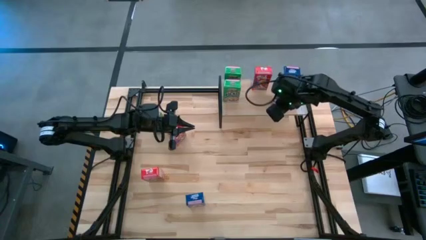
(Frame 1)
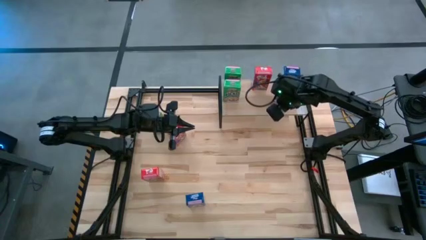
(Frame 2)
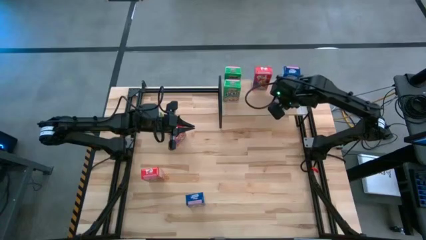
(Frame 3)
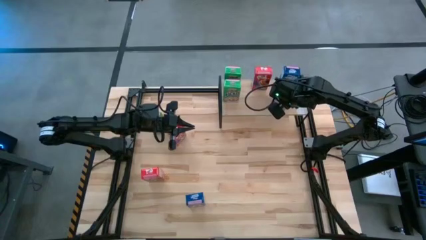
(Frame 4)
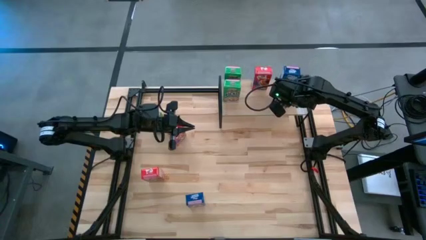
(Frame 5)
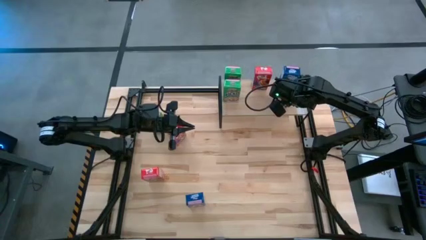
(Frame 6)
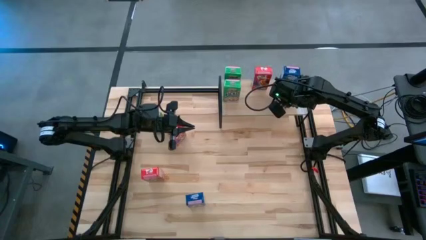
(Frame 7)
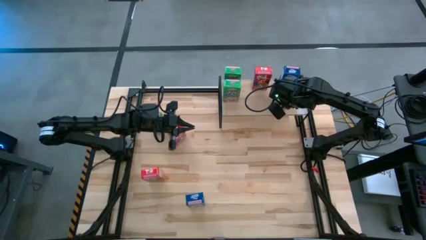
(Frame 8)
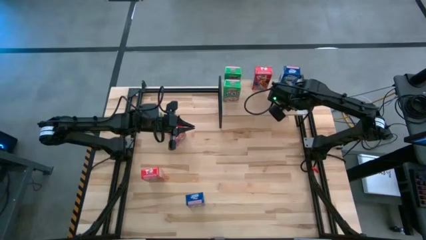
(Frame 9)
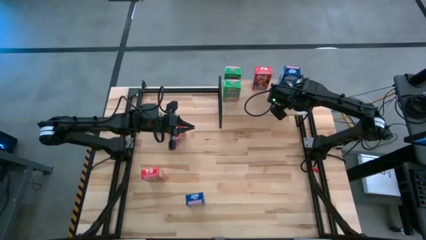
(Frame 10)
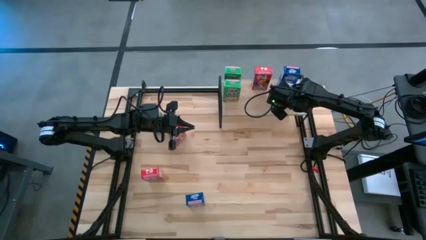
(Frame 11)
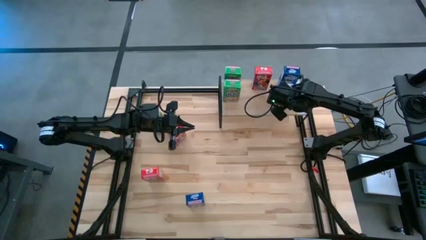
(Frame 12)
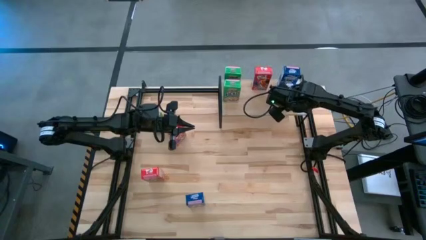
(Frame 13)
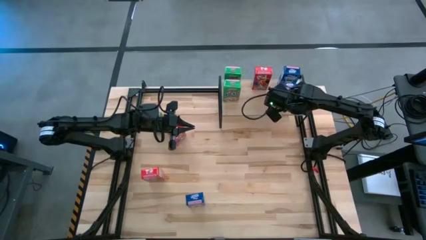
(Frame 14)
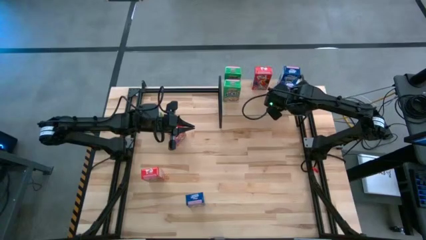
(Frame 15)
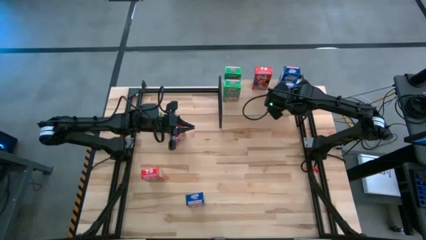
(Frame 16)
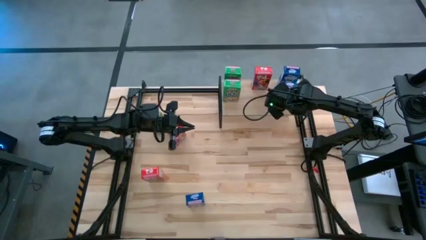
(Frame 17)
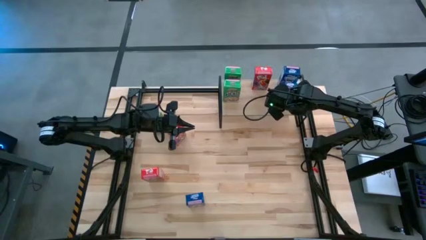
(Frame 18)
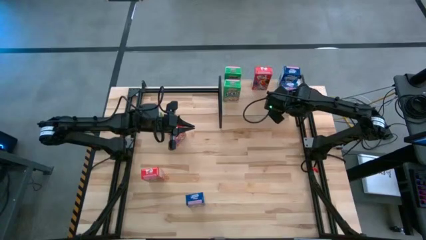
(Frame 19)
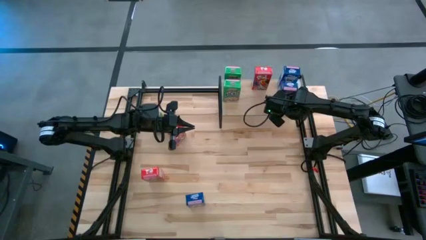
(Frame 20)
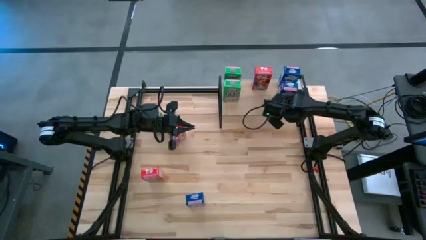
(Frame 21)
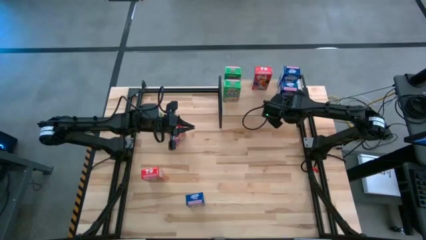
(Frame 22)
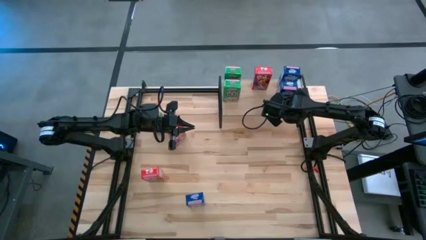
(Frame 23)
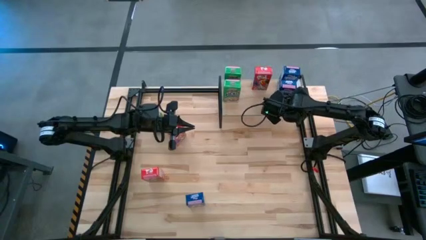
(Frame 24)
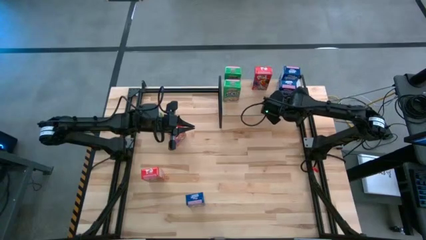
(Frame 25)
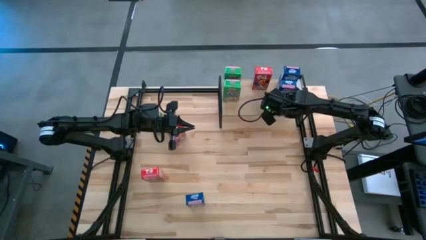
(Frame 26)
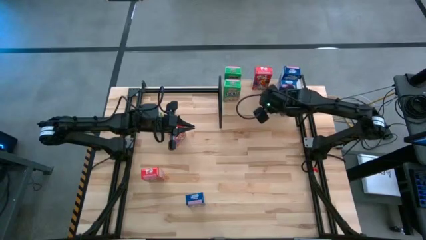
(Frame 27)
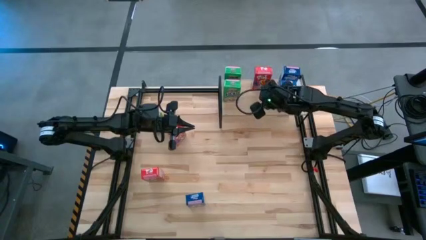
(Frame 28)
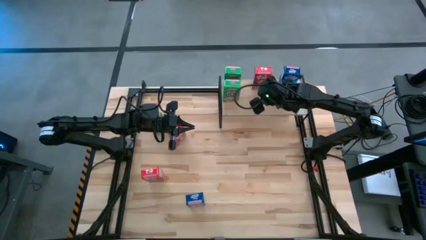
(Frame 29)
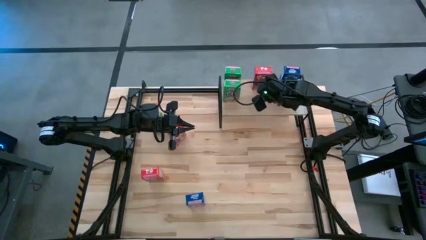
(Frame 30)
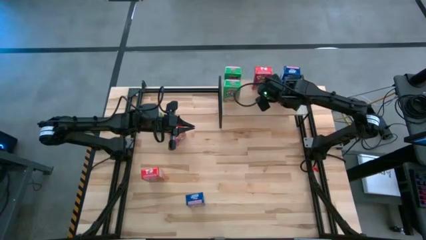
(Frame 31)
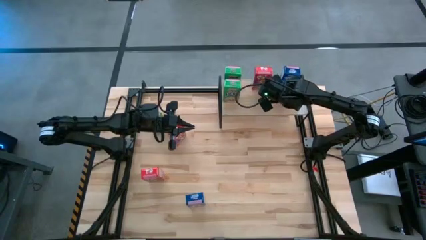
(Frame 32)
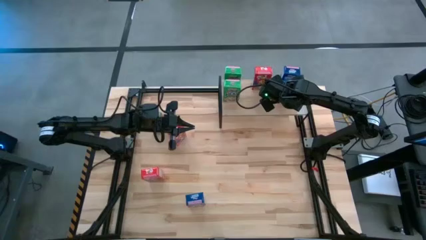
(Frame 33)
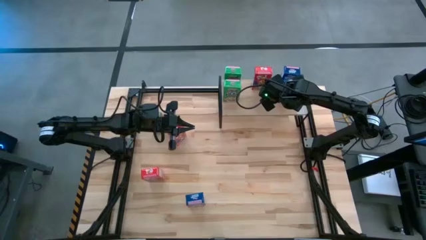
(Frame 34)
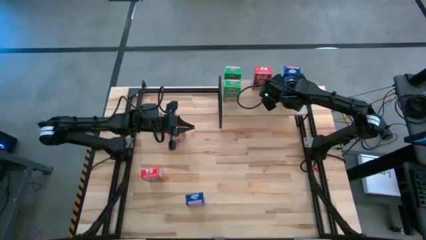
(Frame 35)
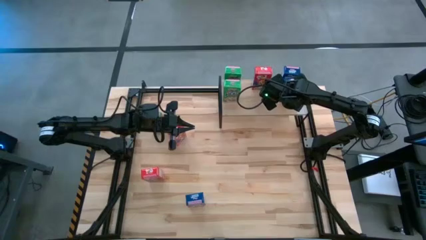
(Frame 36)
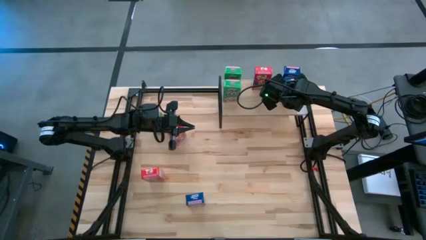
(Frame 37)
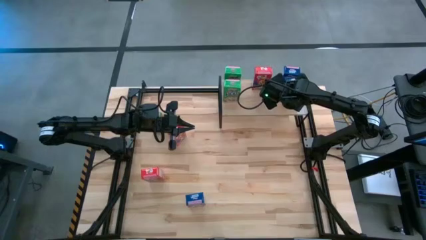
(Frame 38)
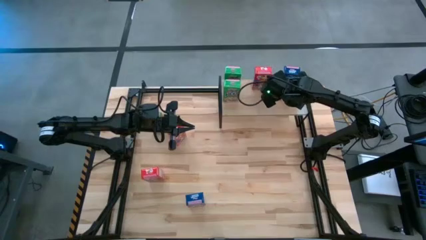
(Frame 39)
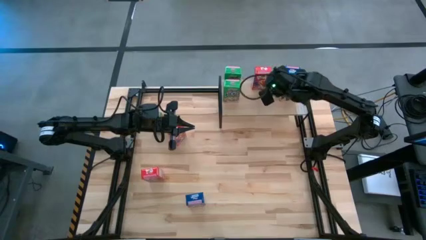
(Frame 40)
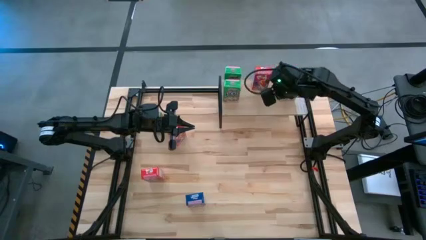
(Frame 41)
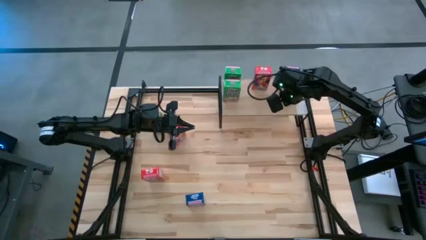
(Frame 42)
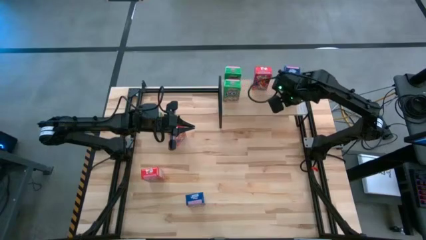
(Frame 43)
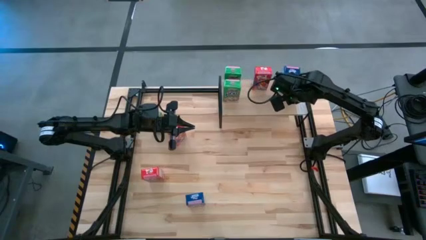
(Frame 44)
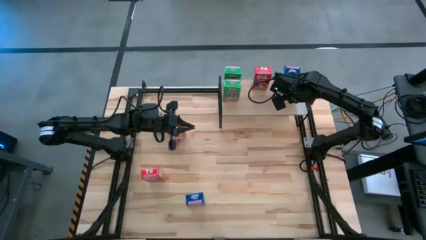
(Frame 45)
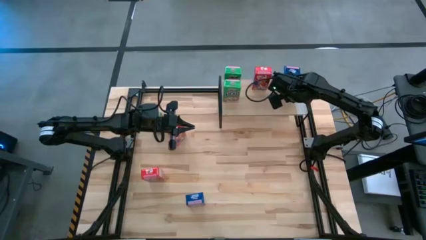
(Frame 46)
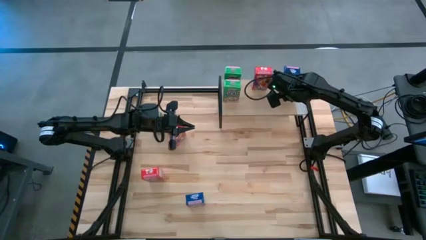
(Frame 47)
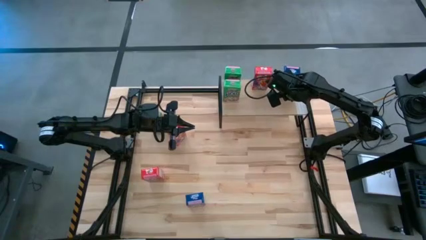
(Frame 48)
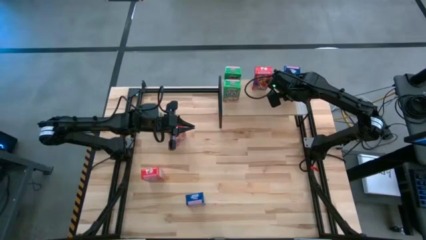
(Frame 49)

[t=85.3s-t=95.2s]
Task: Stack cereal on shelf
Put the right blue cereal box on the shelf aligned with other blue cereal boxes

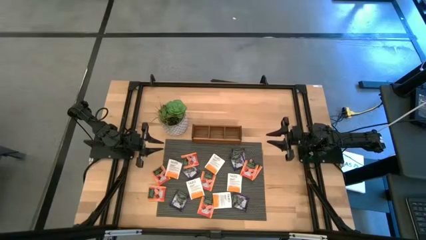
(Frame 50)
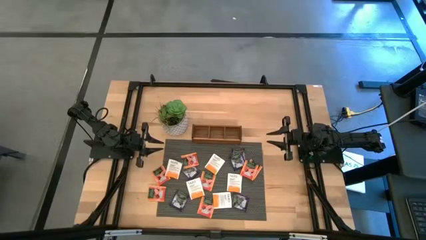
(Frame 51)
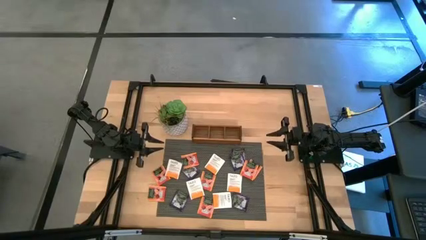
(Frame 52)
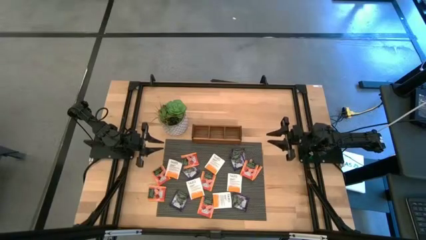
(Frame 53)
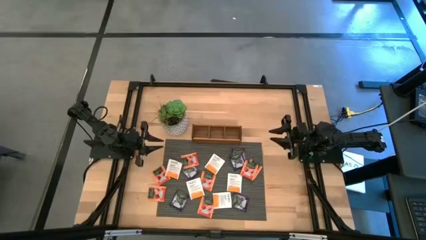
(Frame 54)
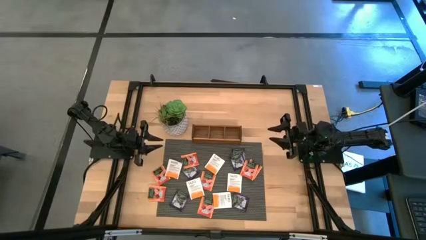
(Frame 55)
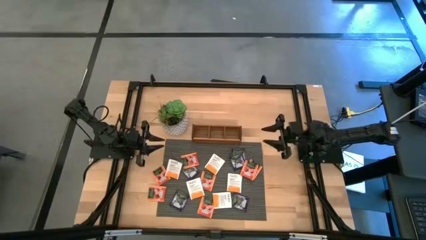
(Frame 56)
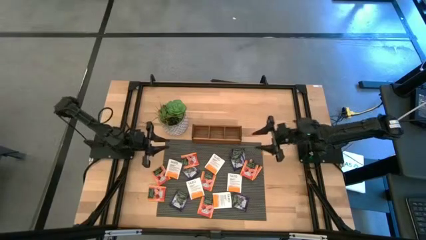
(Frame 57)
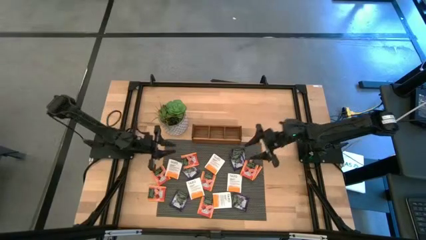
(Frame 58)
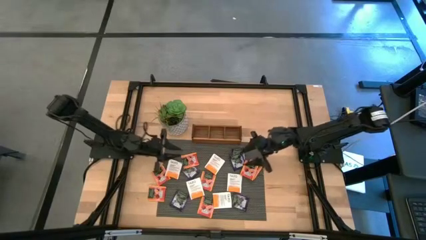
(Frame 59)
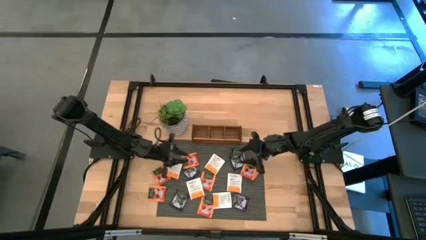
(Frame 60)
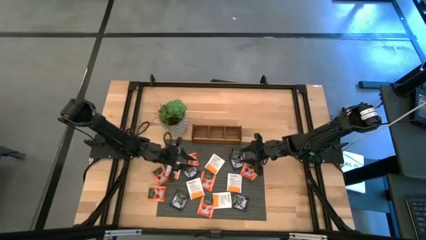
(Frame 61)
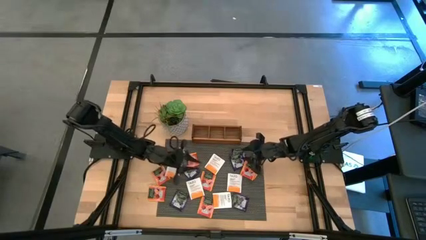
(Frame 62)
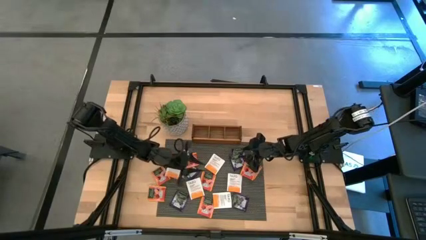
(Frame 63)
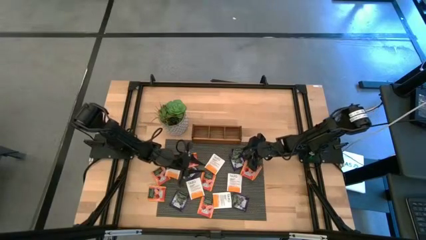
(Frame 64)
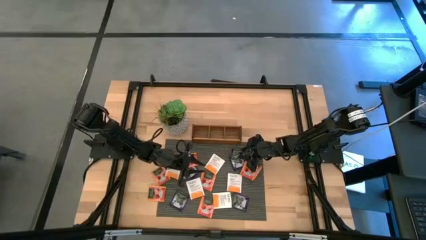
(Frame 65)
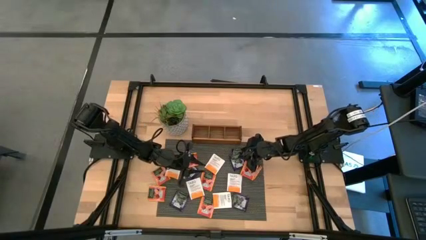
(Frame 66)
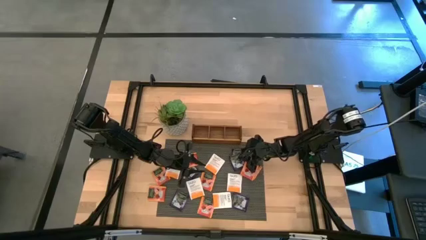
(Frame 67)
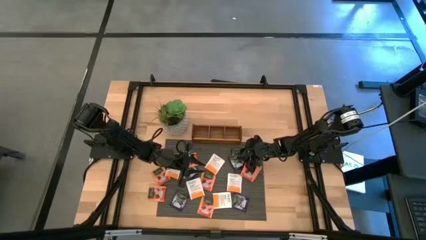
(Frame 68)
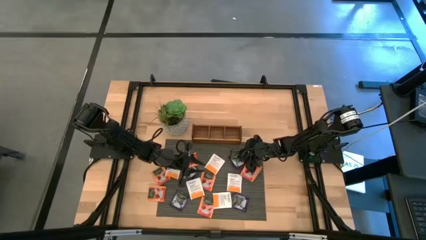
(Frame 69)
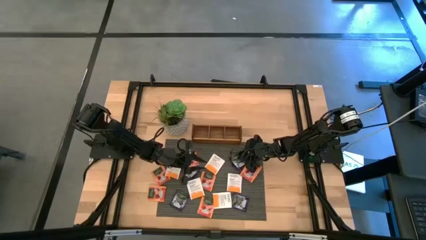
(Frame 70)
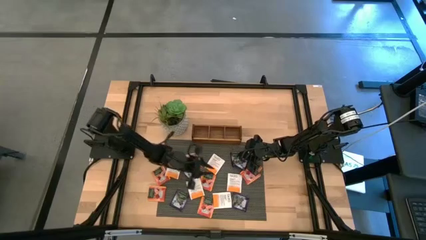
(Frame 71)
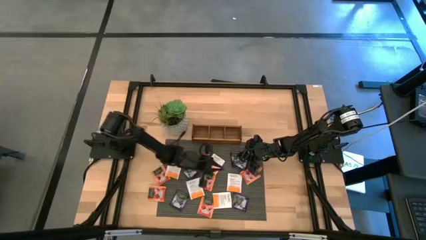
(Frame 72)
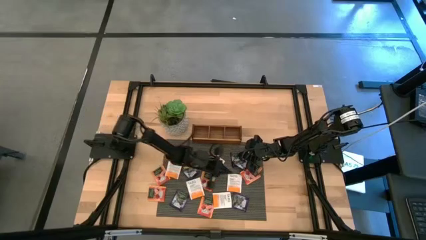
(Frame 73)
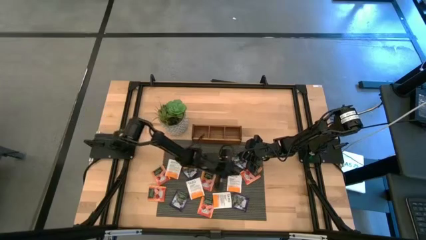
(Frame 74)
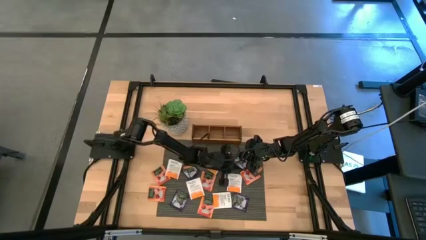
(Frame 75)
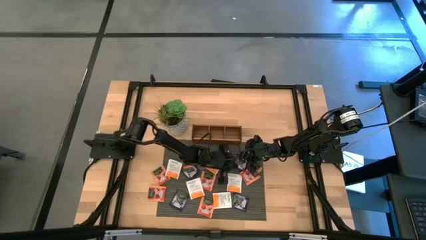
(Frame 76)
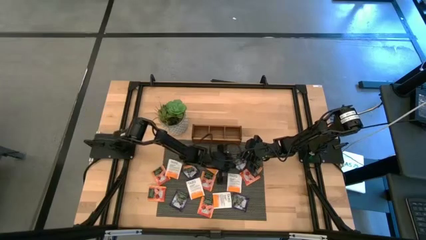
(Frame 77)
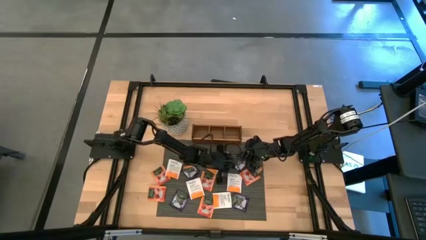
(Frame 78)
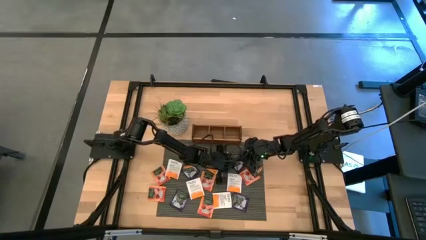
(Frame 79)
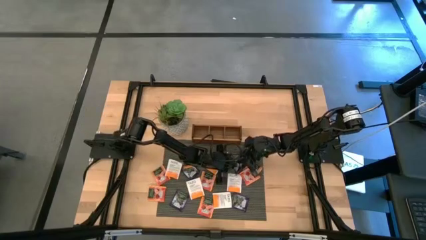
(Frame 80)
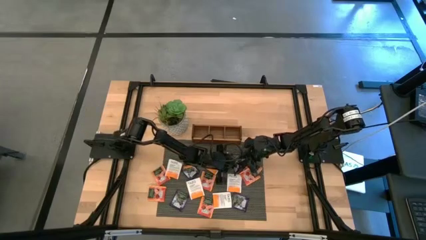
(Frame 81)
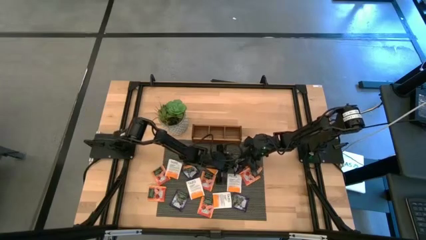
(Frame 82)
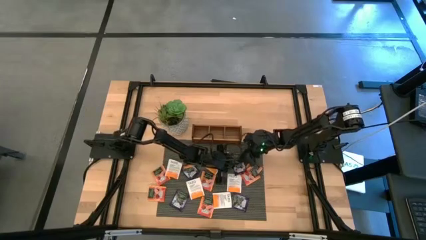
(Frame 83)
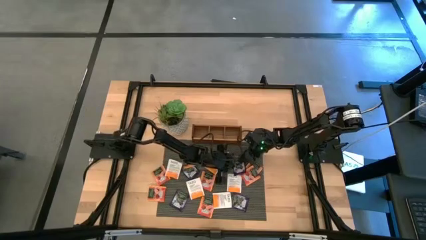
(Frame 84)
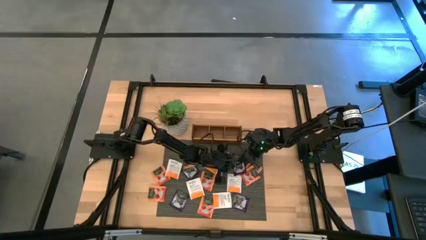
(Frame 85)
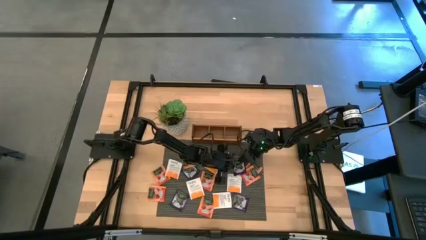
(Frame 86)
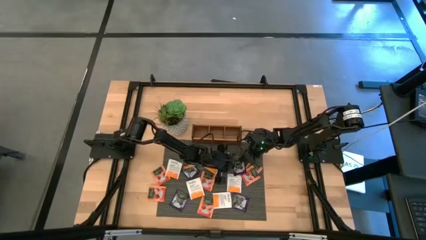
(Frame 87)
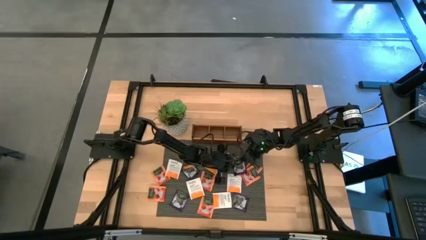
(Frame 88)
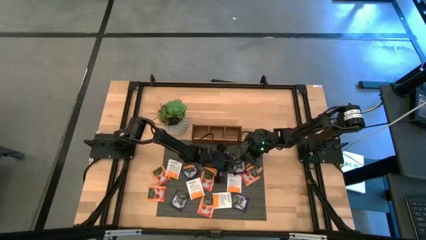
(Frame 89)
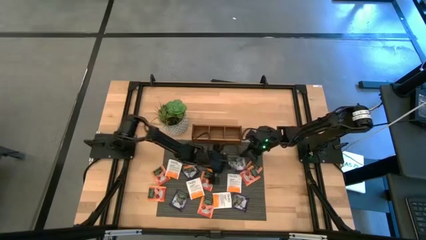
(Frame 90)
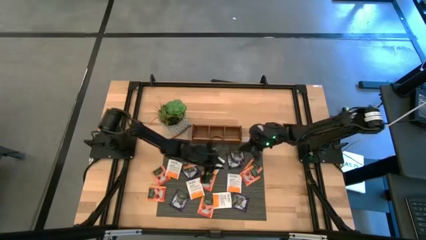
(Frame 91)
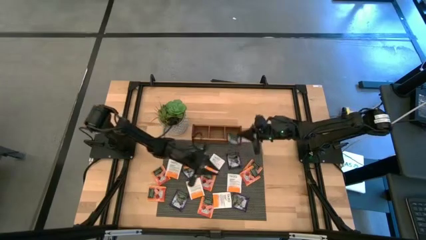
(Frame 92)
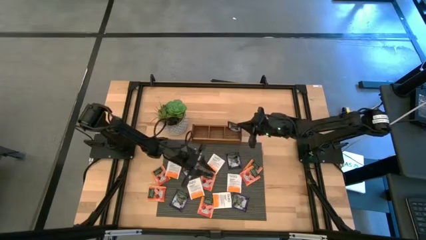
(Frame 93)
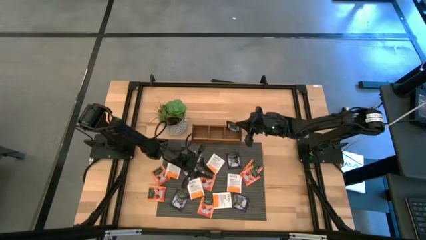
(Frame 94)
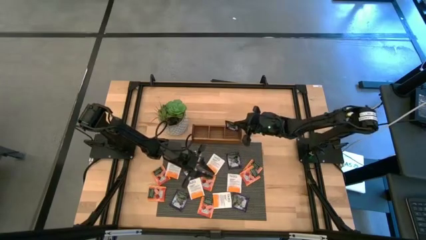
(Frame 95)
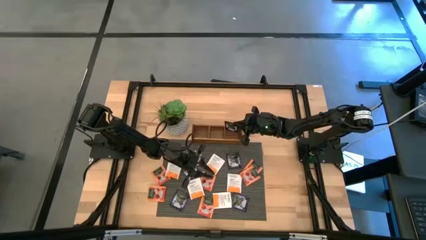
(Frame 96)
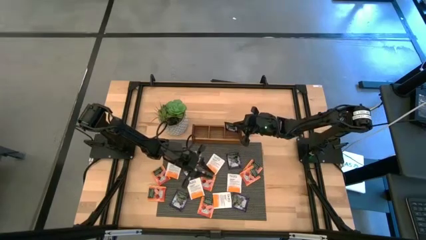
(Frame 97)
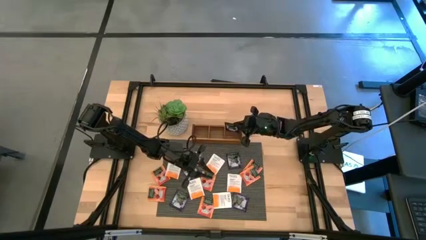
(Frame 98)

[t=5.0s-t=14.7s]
Task: Pick & Place Tea
Put the blue tea bag into the right section of the wooden organizer
